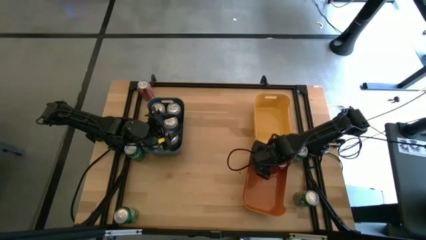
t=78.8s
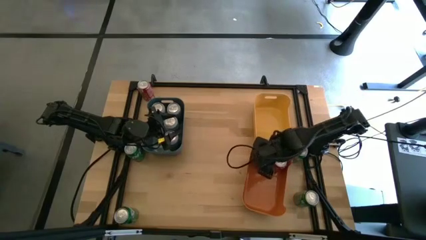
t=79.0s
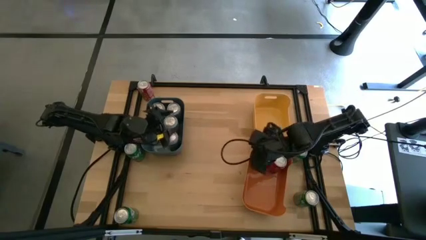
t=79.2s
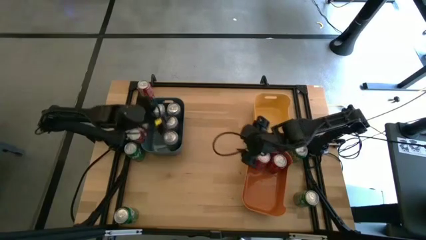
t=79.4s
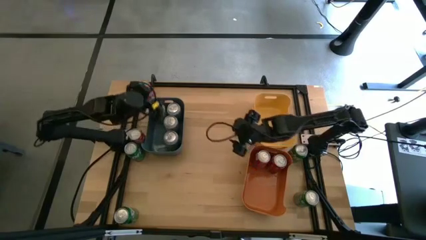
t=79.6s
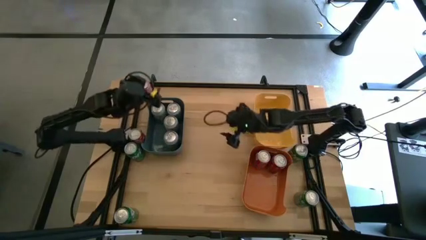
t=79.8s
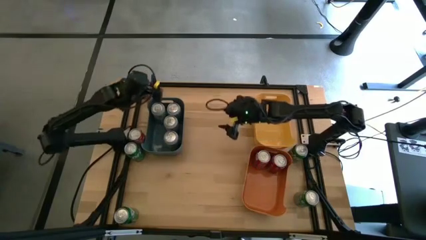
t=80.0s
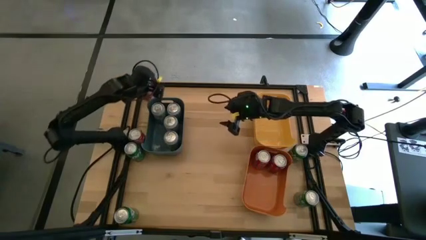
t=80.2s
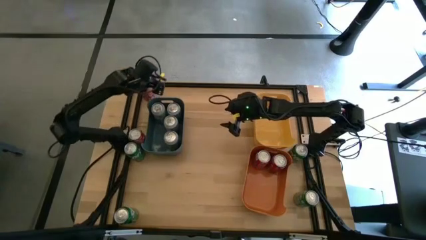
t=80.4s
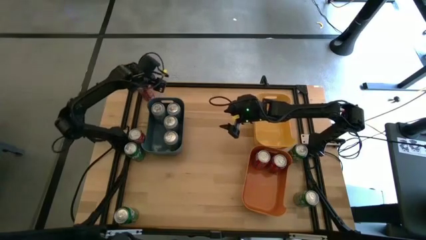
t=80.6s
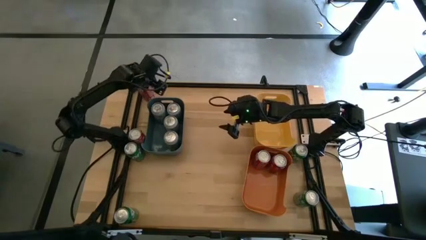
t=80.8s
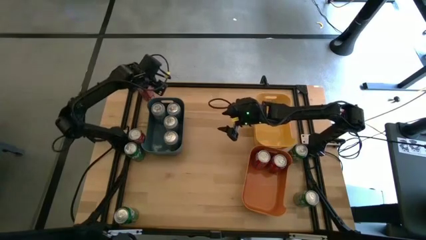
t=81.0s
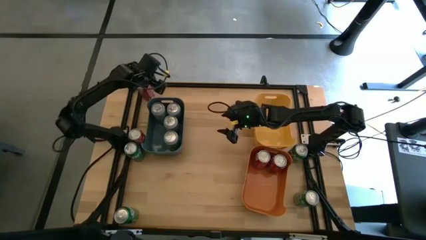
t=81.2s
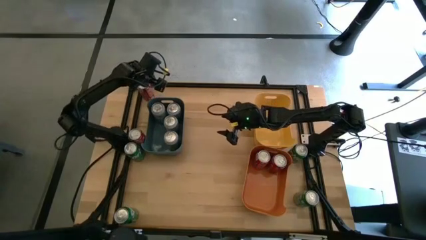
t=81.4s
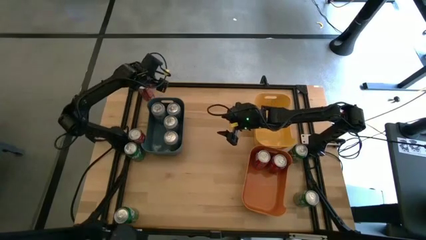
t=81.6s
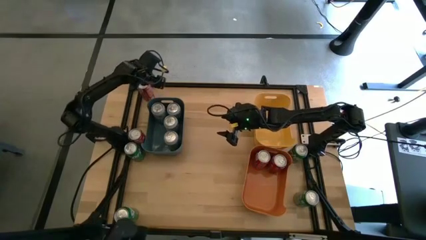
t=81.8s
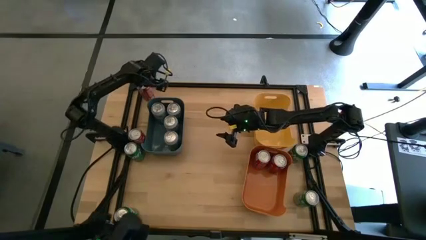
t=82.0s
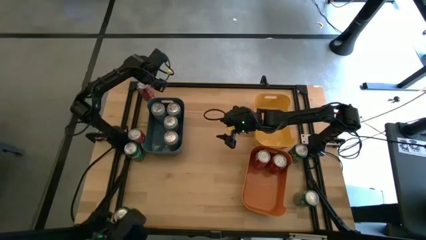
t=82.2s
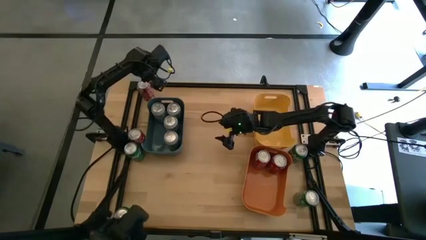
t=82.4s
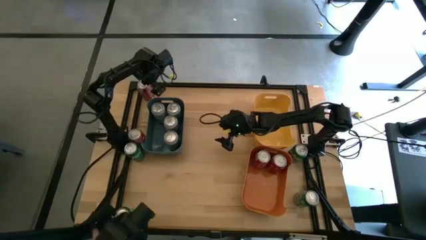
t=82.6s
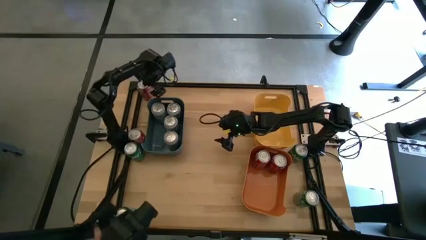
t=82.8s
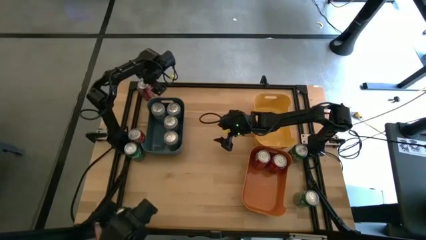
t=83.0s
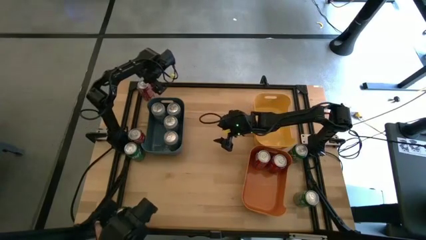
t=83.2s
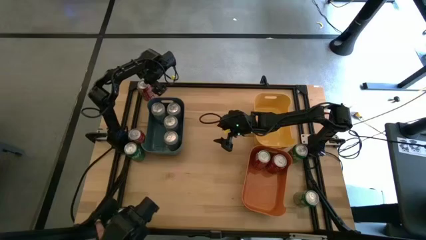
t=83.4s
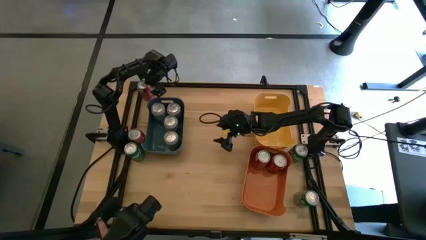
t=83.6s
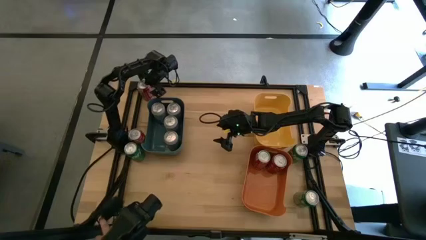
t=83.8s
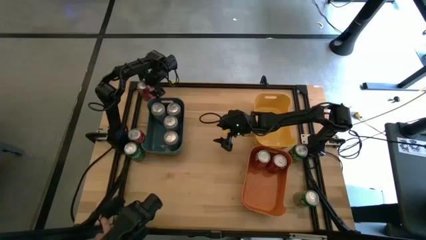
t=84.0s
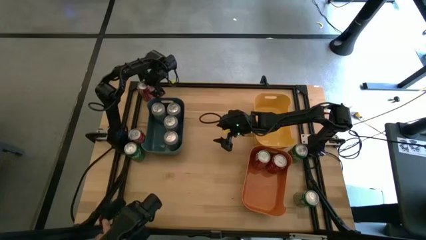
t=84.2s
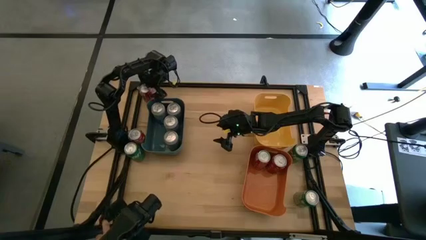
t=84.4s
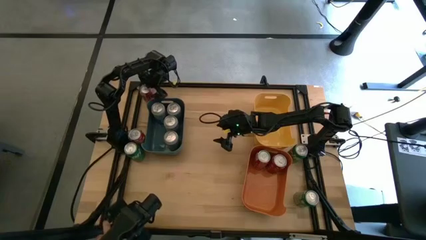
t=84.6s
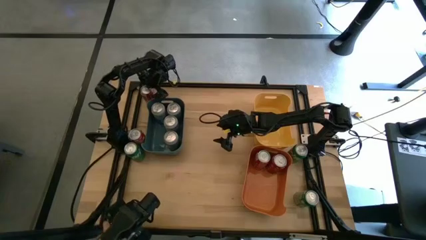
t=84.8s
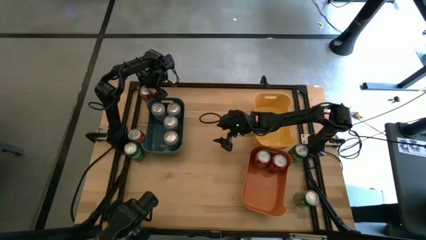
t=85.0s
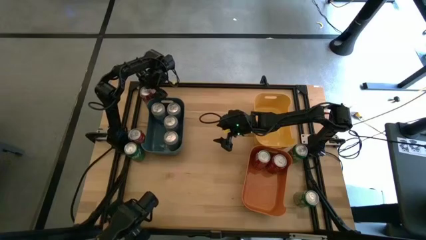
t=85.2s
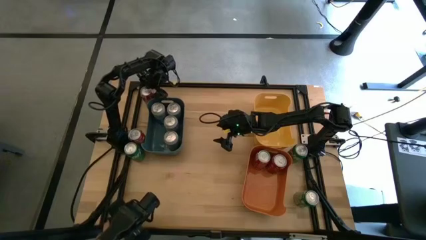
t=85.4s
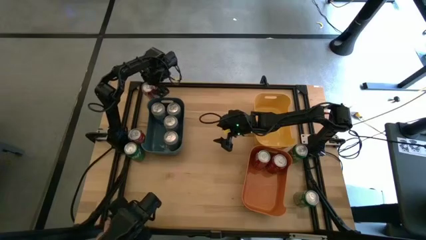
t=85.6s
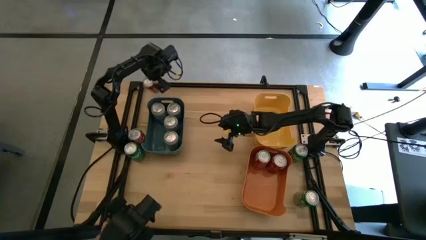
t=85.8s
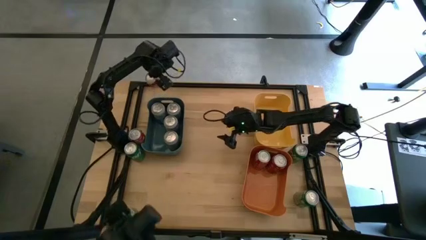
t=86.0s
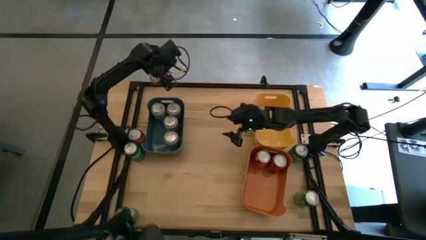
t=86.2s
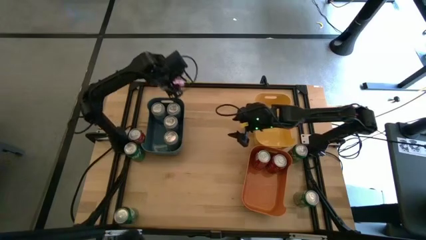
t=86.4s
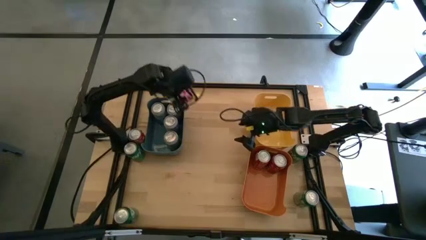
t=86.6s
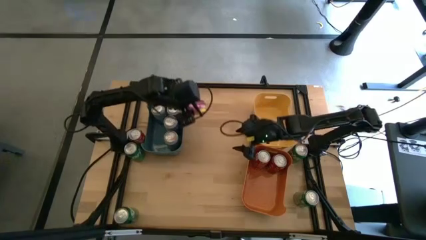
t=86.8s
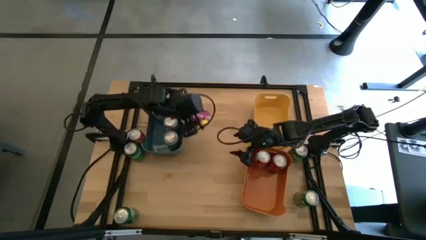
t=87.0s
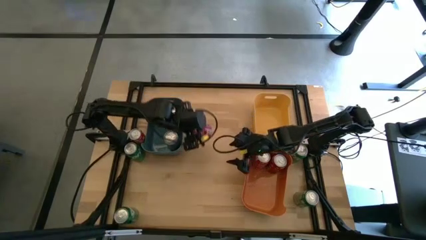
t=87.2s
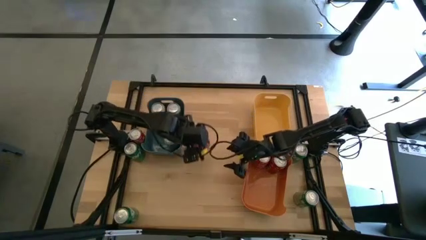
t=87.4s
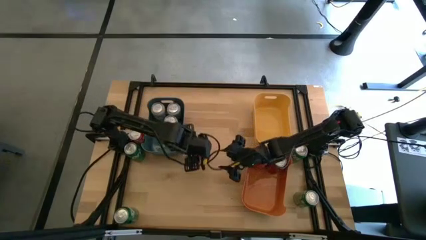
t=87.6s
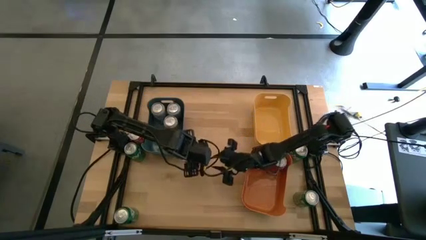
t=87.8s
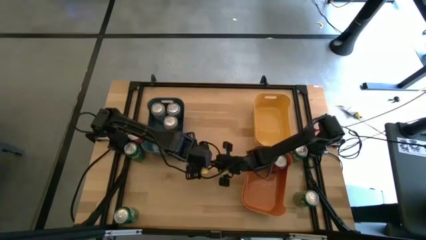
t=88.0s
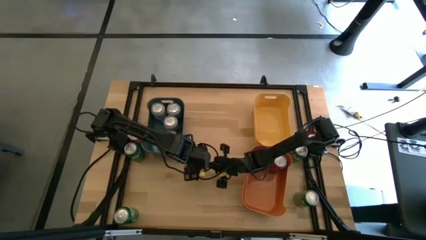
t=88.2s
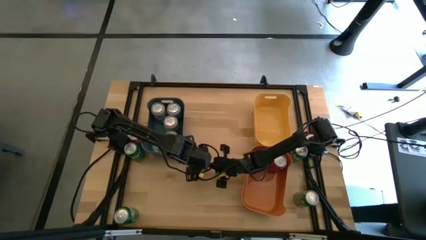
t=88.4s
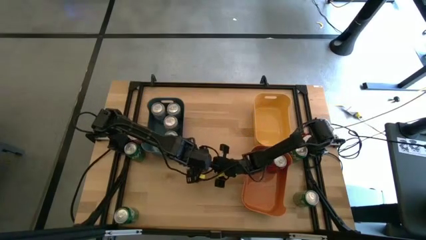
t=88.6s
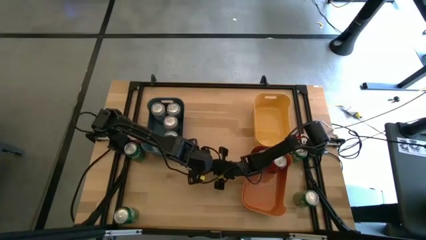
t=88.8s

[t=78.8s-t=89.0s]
Task: Sort soda cans
Put the top red soda can into the orange bin

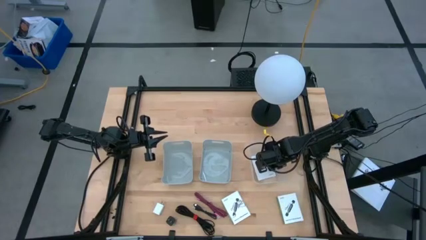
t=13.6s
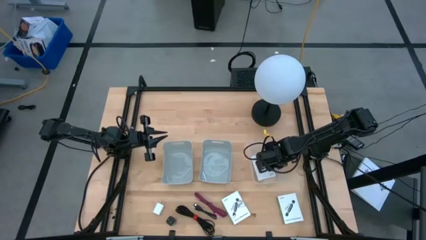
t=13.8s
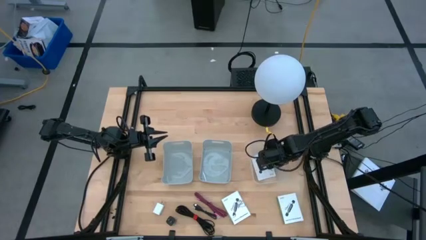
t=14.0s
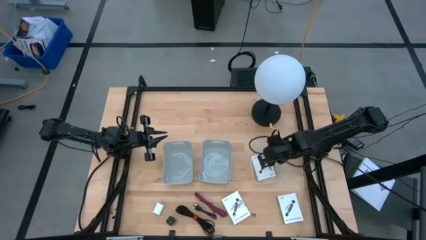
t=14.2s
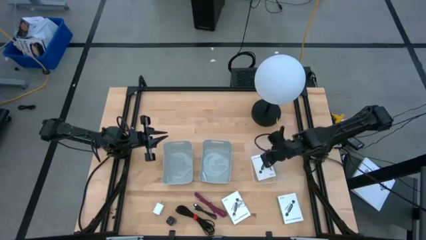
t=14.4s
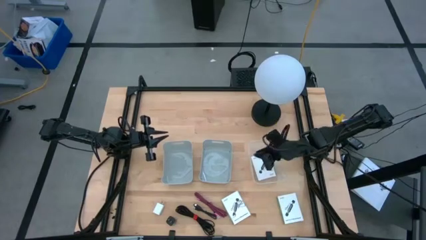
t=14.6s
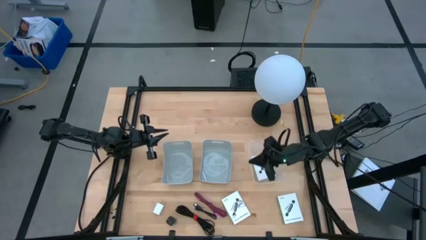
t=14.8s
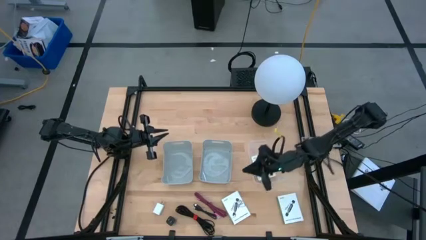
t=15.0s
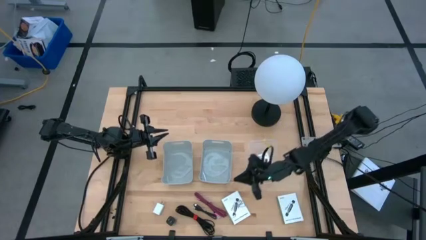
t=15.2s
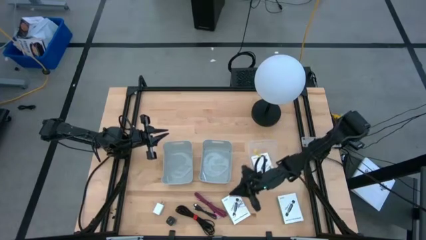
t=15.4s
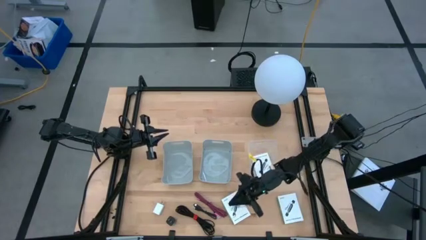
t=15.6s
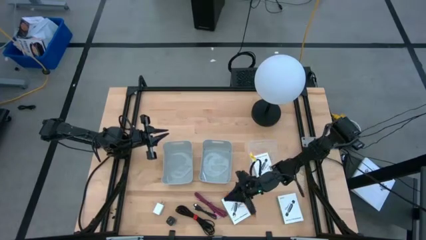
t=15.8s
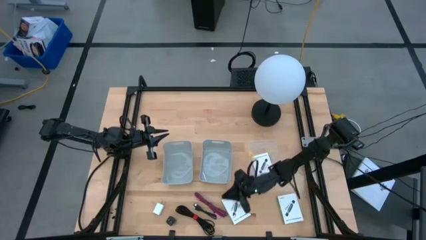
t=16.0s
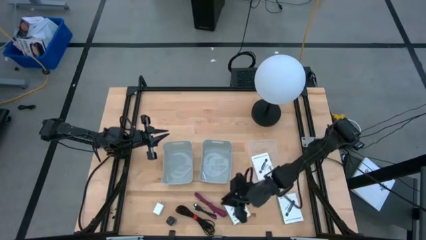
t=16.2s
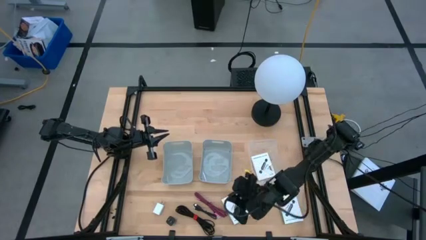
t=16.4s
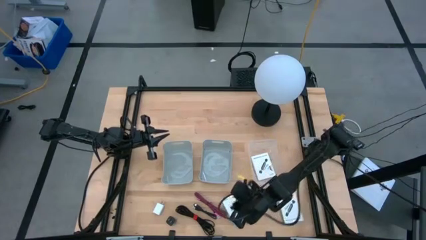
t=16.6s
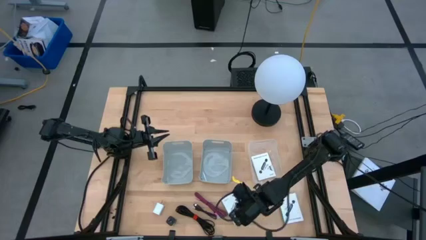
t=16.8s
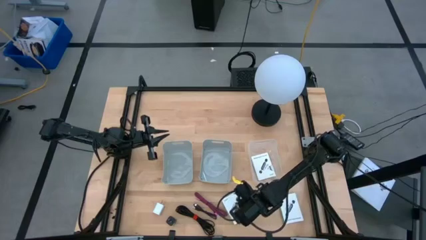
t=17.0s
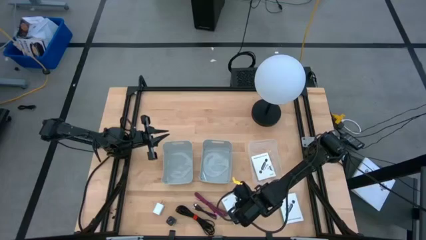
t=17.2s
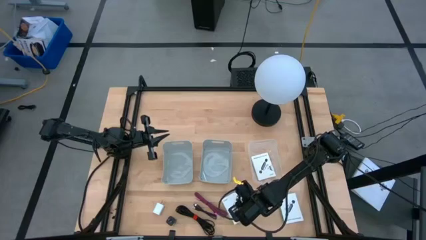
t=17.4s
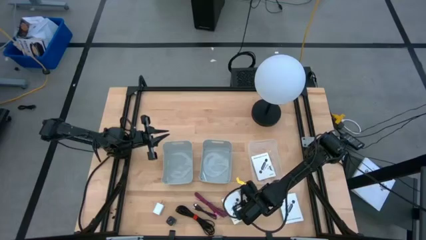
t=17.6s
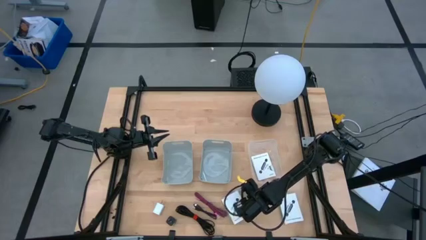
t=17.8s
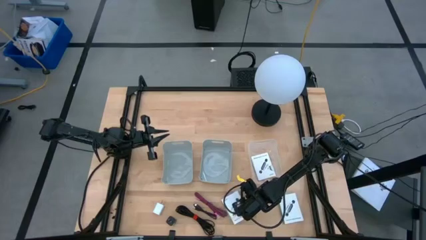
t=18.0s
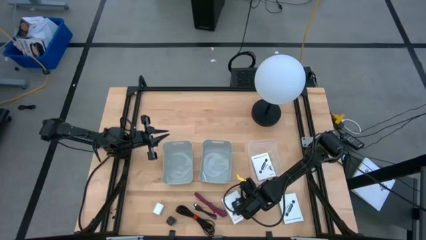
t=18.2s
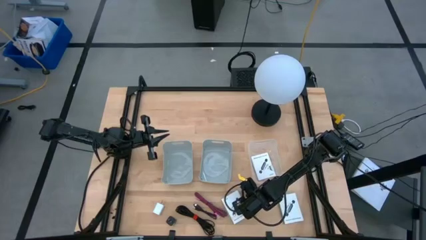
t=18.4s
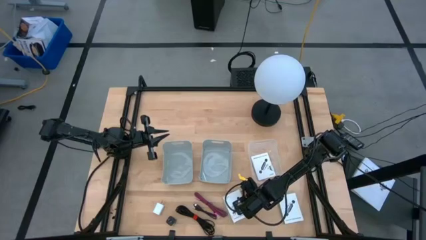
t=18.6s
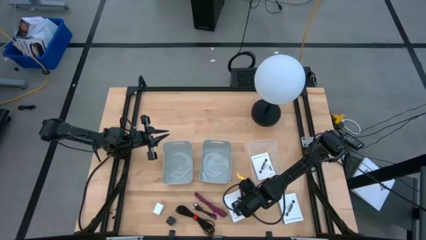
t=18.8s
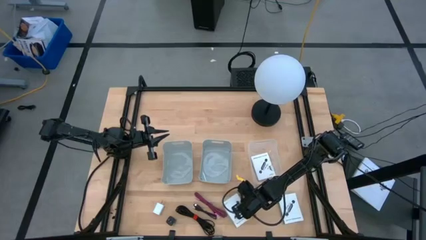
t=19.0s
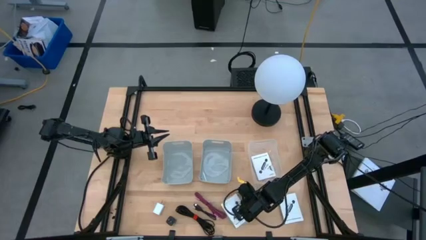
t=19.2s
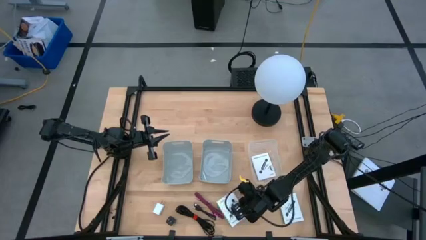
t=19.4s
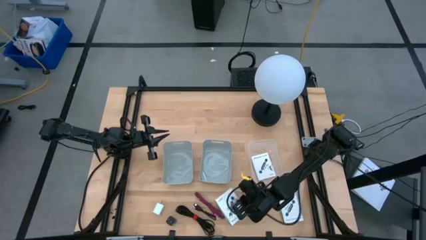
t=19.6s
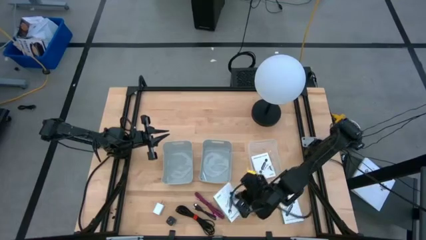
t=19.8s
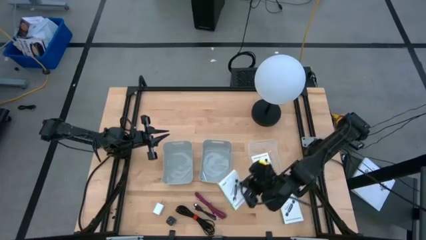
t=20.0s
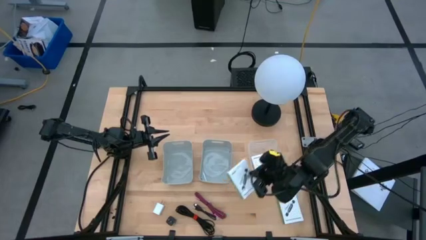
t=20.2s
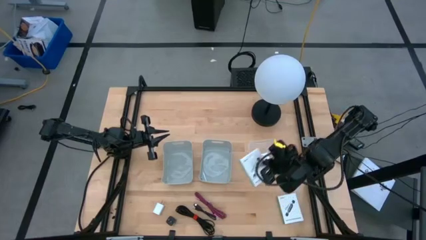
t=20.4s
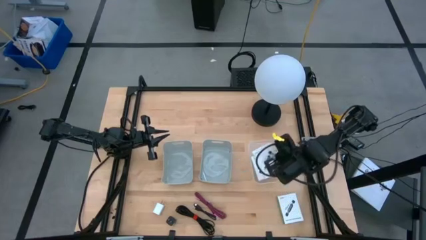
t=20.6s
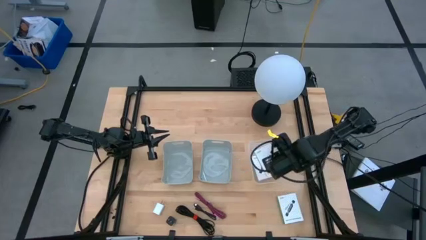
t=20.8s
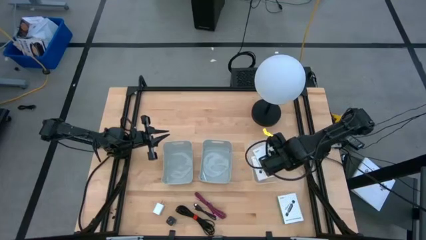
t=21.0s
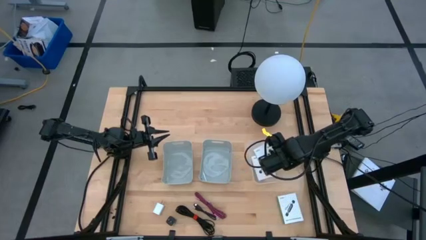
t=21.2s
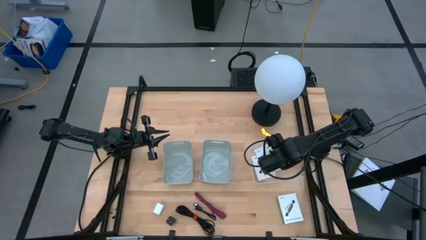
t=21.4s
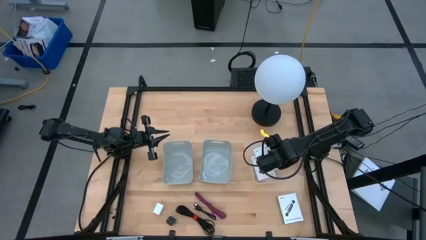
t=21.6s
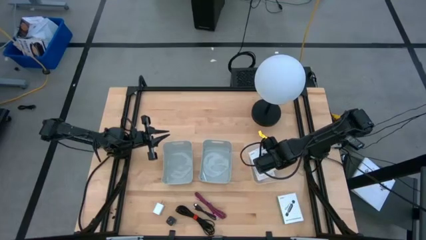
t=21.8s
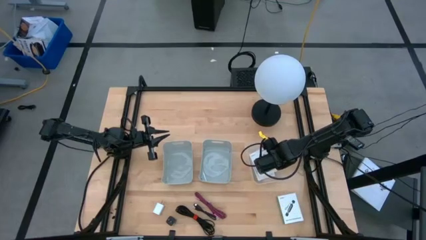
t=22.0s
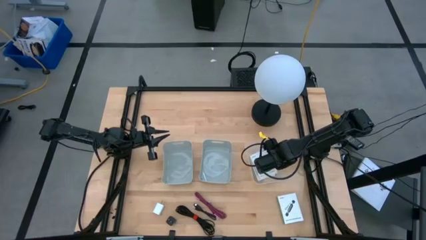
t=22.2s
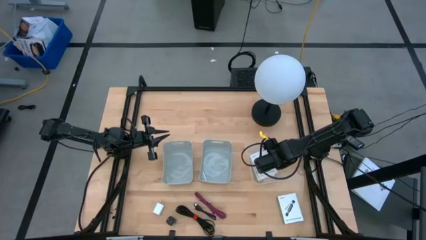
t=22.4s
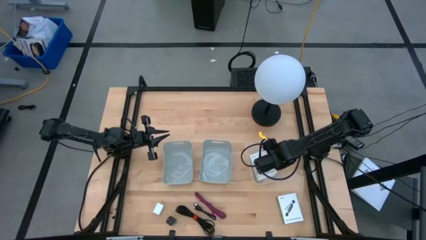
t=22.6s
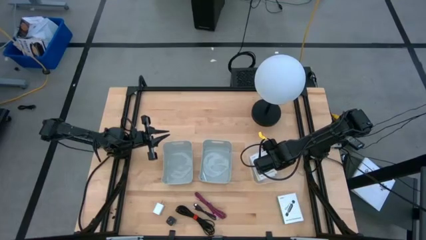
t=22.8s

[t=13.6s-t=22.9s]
Task: Pick and place items into bin
Put the left white card reader box into the transparent bin
